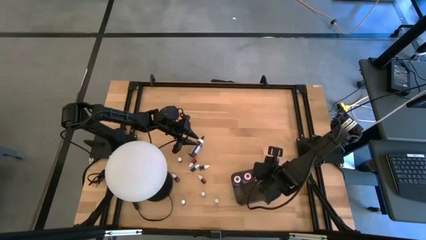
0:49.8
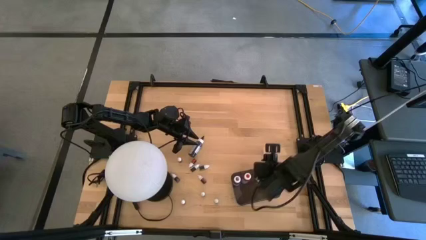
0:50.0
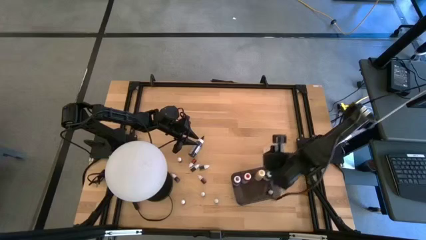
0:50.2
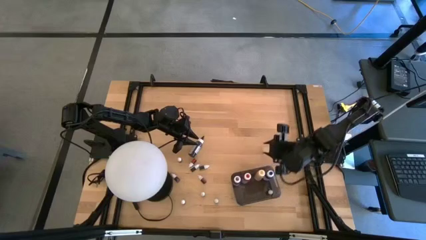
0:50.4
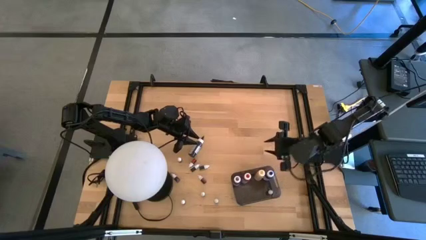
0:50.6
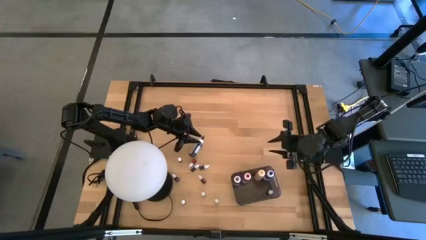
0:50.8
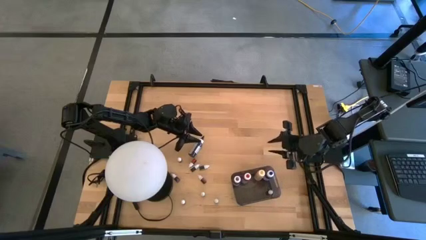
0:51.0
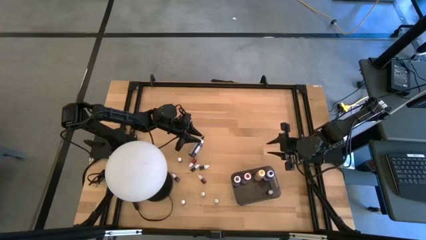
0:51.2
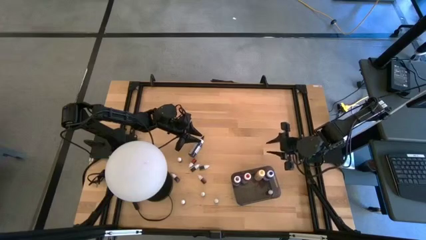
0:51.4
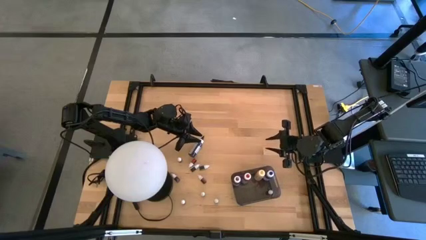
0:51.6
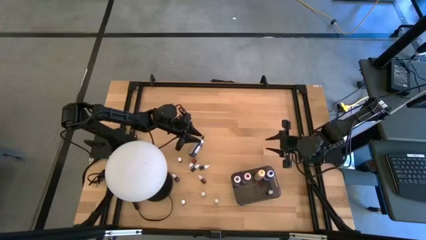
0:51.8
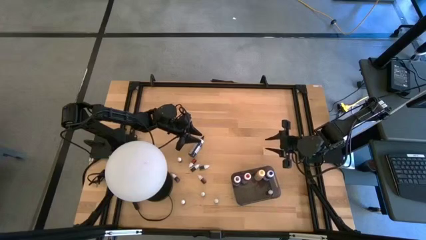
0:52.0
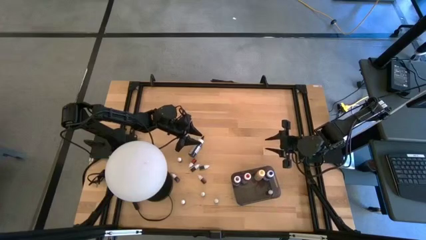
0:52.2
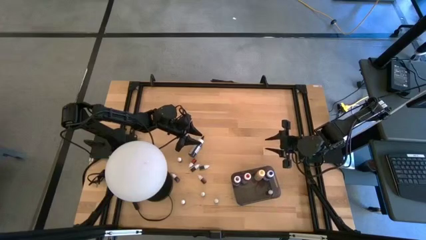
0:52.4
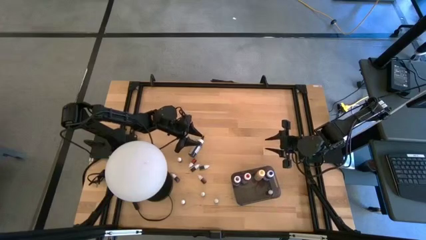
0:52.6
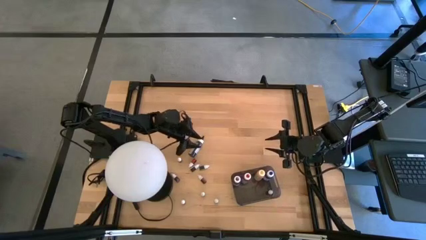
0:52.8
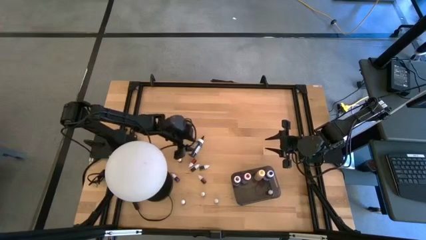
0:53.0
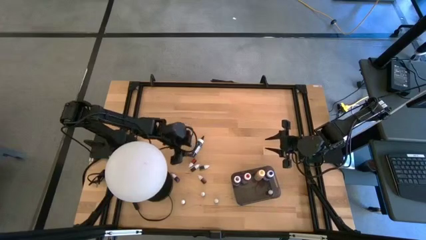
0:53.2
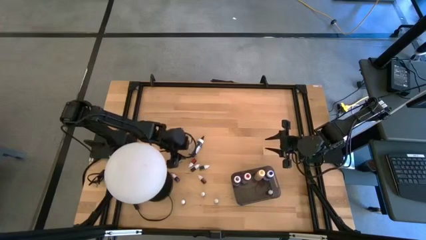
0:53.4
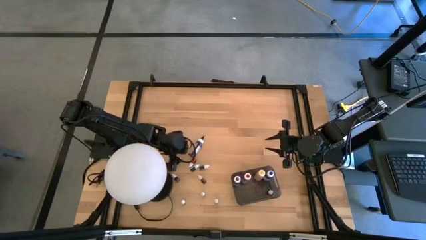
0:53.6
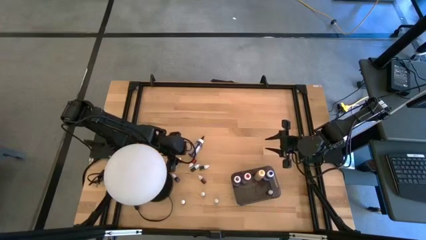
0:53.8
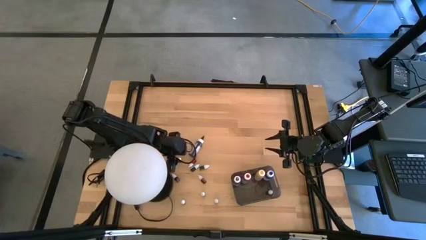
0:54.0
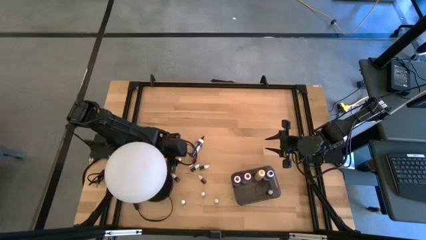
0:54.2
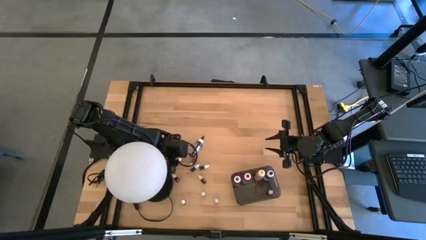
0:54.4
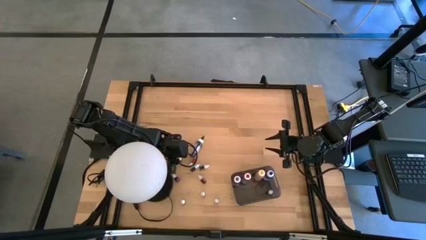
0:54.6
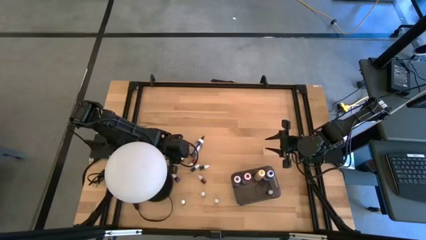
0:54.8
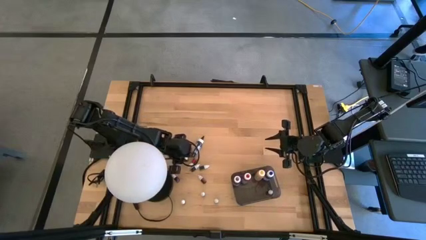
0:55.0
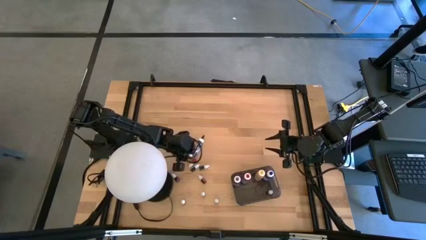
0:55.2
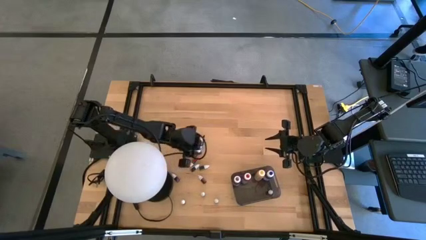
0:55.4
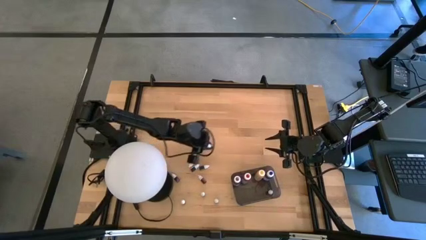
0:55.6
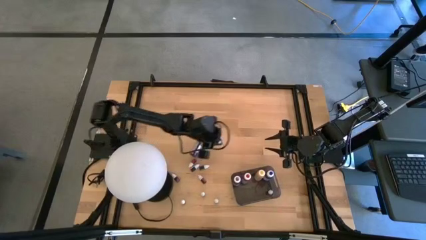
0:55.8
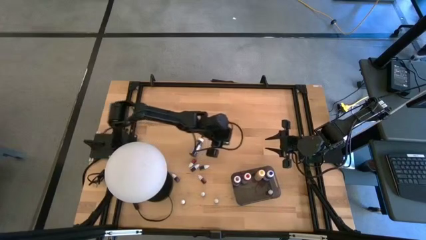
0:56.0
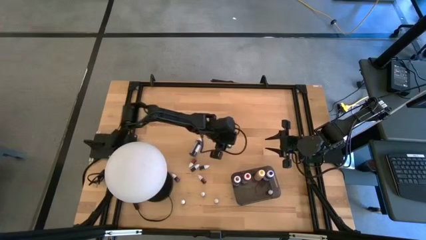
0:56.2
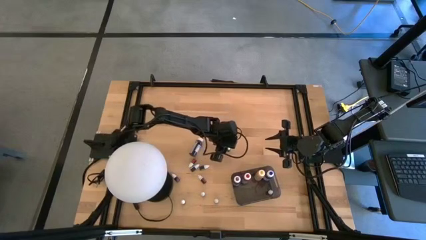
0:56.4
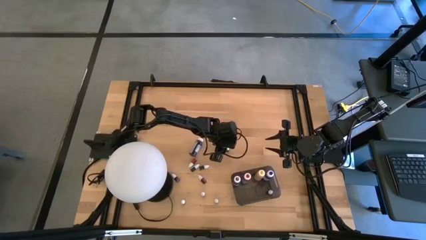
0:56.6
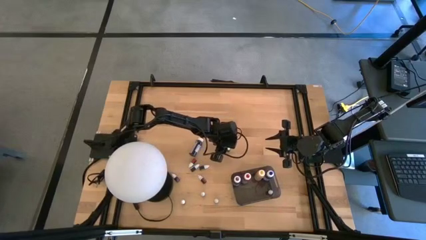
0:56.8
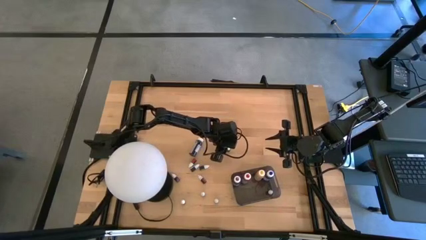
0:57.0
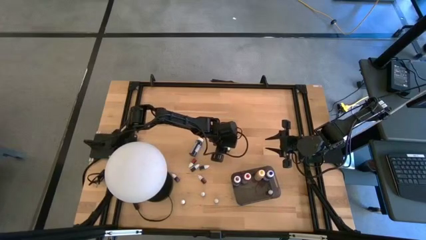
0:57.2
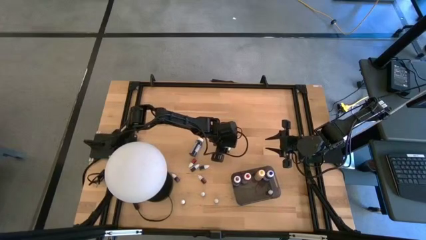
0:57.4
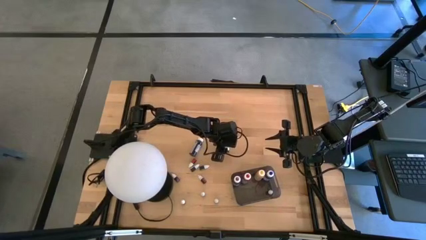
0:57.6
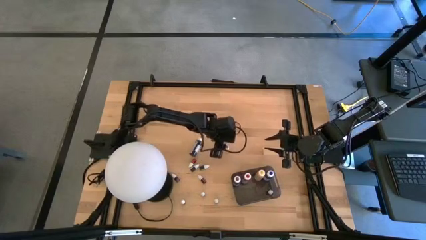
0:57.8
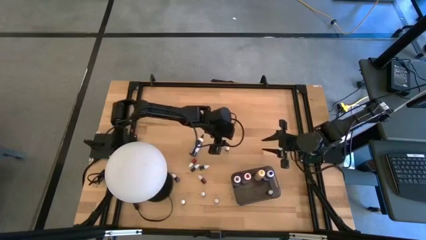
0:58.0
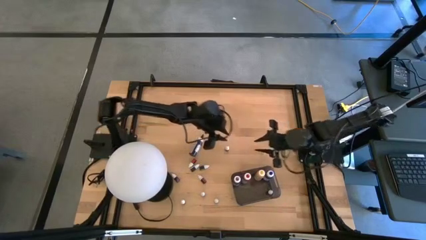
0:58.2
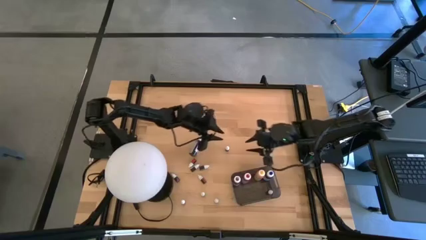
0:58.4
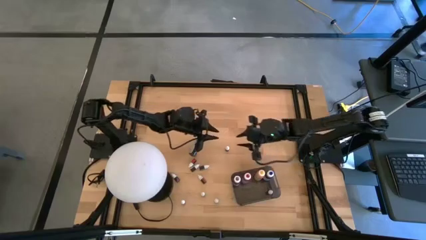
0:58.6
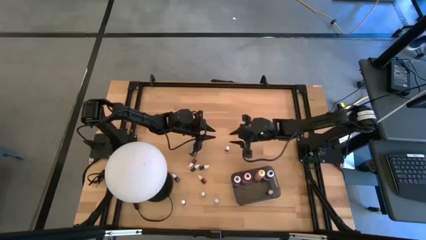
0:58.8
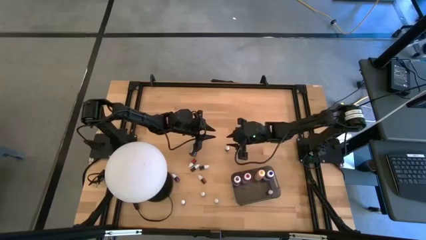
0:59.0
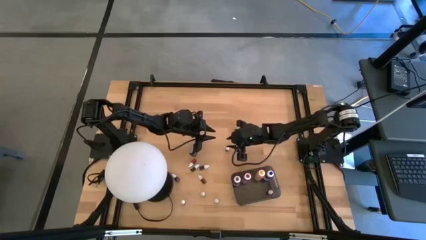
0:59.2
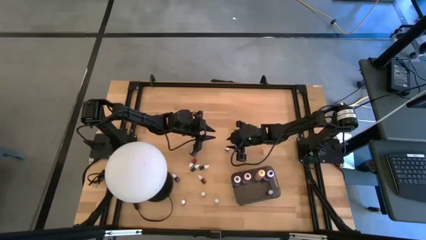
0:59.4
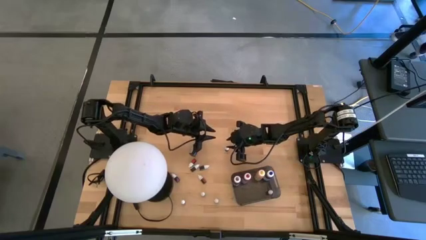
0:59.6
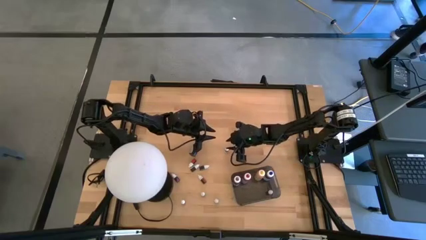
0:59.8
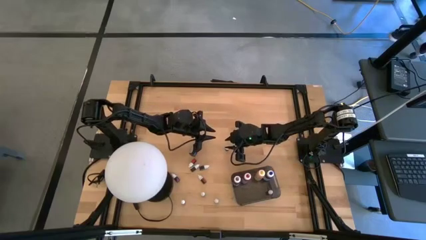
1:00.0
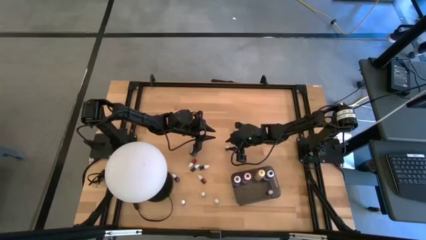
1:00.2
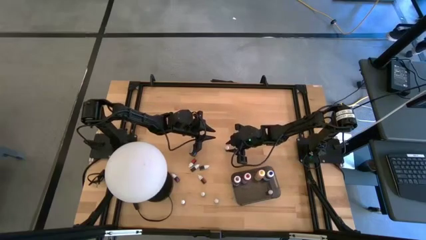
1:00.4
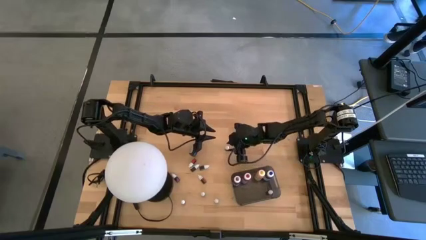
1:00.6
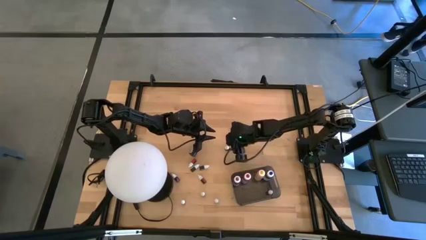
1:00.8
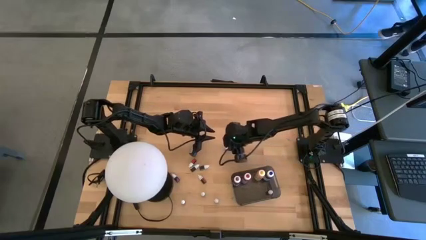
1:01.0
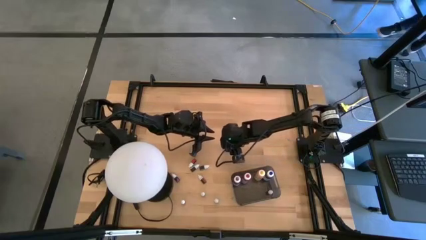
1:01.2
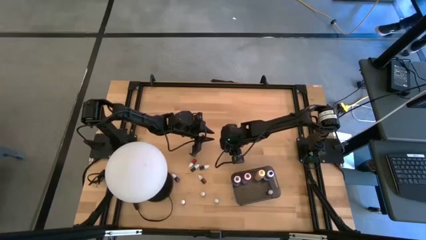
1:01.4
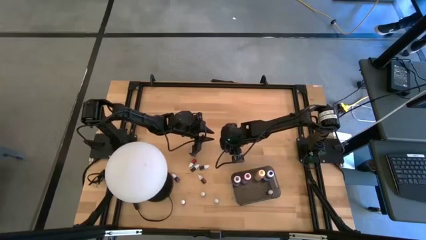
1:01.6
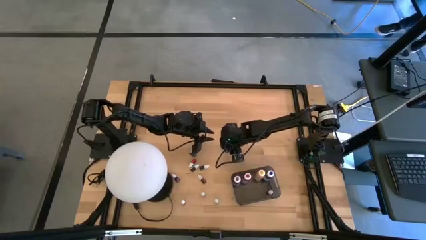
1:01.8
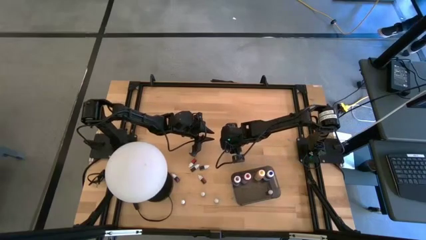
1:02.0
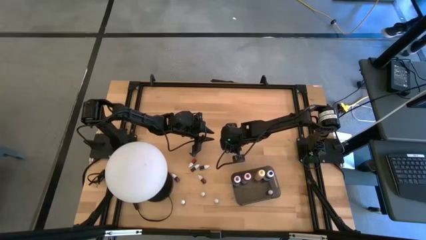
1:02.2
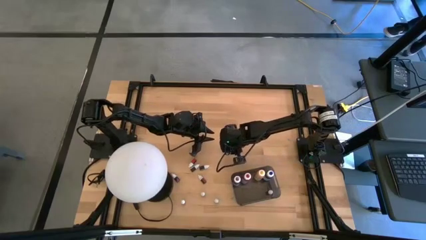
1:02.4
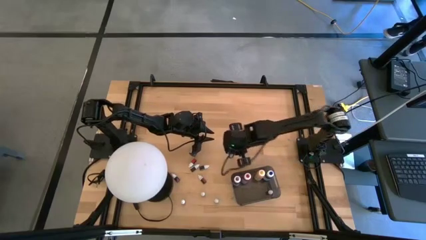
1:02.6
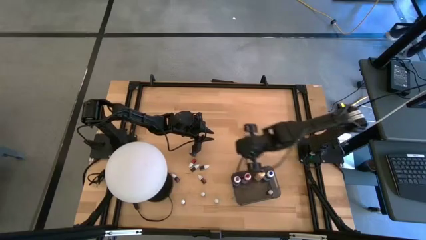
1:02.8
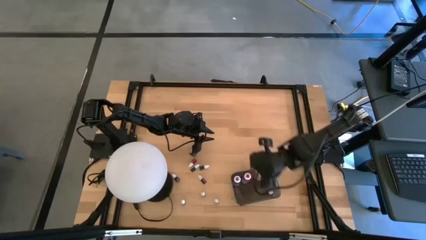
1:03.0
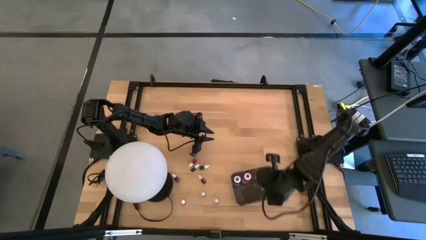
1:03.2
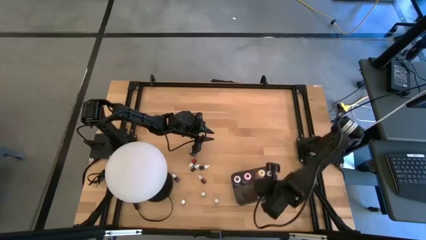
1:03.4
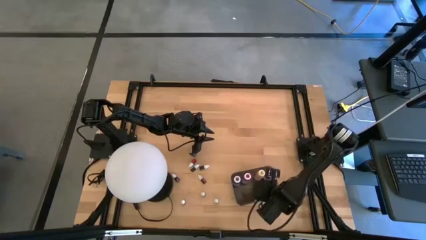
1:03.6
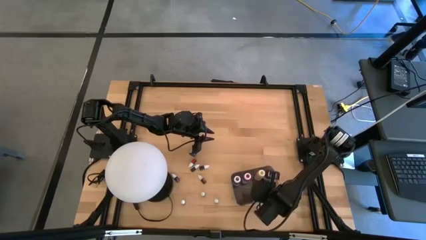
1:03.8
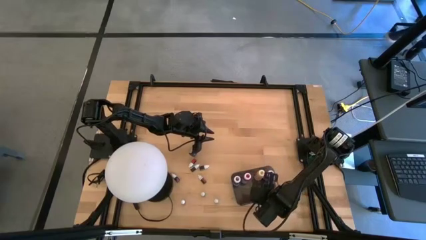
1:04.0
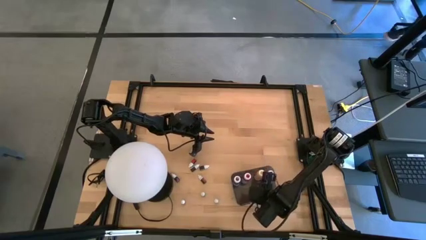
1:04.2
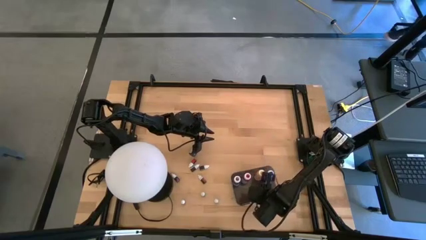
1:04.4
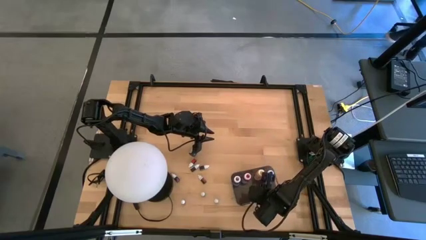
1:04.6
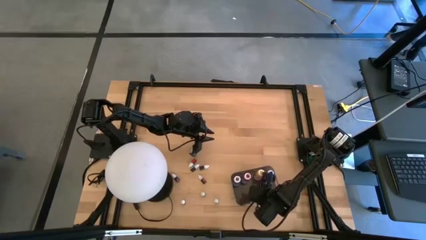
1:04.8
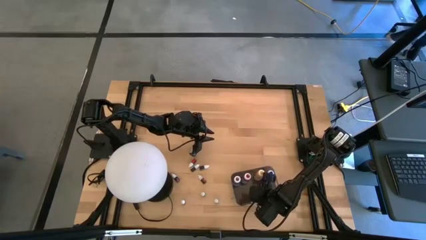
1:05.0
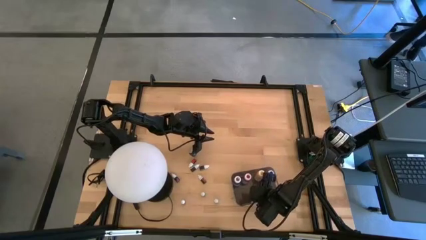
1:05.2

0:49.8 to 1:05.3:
Task: Pick & Place food coloring
Put the small black food coloring bottle into the bin
